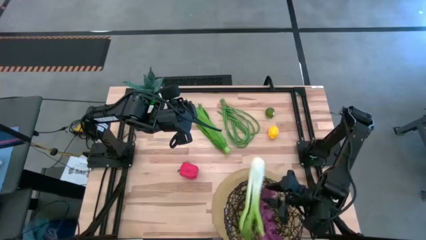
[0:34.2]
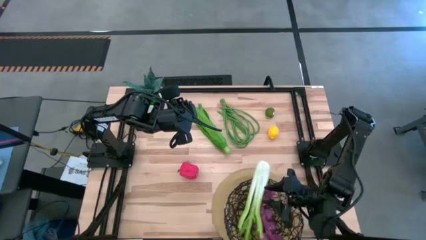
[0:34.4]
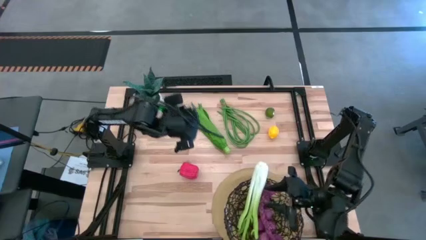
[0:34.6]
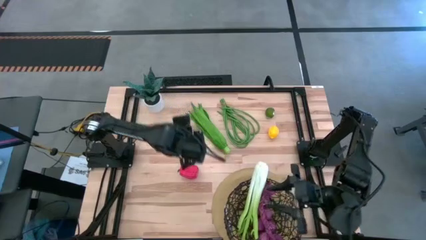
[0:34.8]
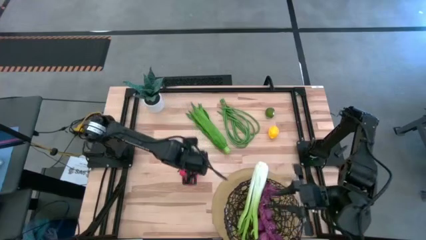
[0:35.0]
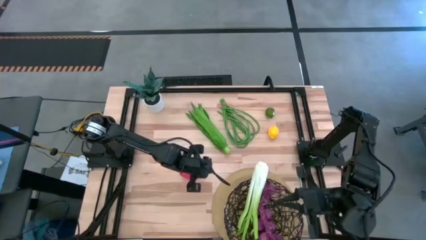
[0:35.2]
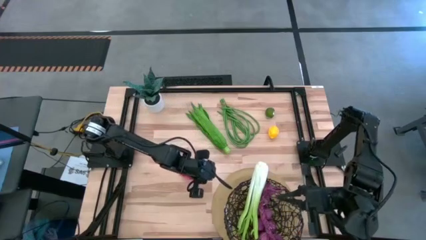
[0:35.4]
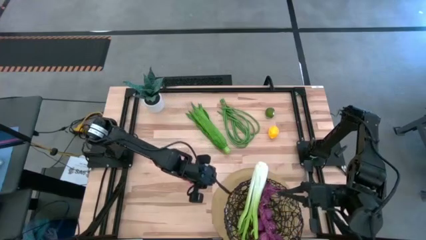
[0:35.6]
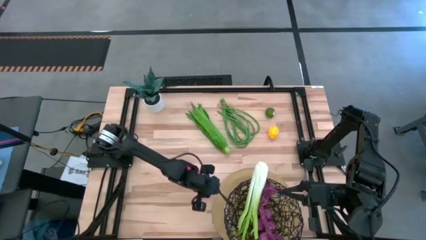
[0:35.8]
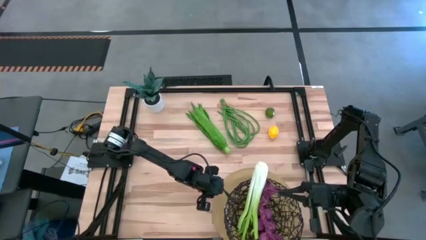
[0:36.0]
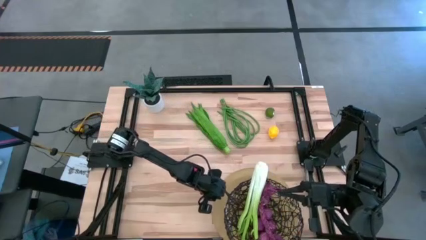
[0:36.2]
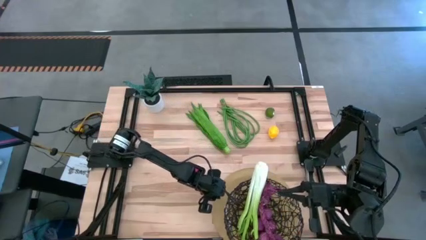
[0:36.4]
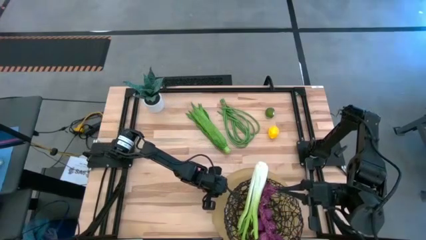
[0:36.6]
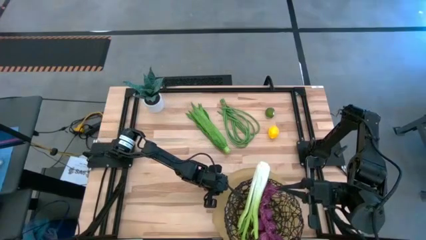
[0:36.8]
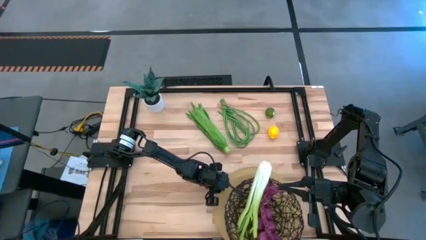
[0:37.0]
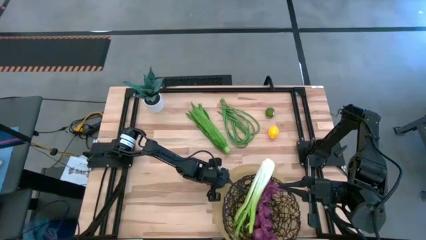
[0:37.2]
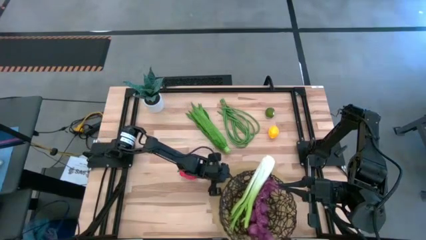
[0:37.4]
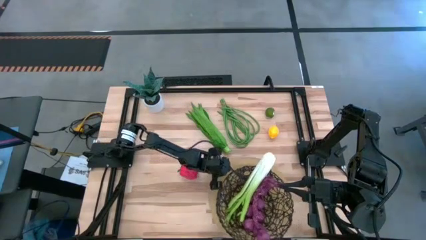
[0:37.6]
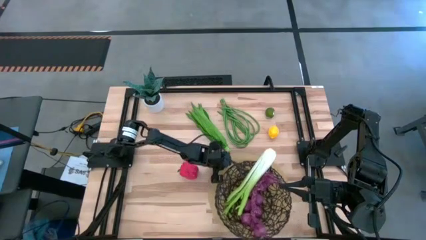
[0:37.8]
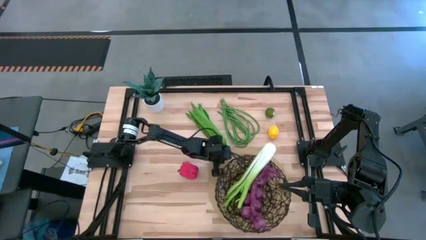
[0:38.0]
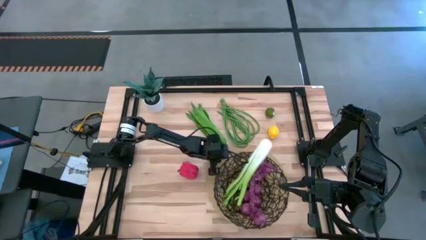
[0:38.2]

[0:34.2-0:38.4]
Task: Build produce basket
Move the brown mat to the center of the table

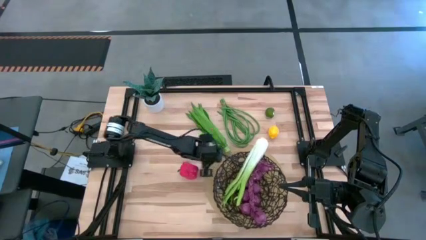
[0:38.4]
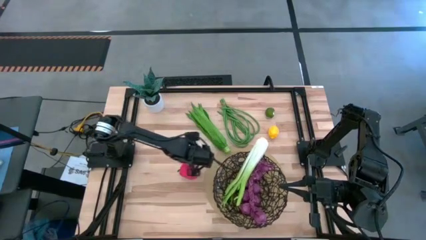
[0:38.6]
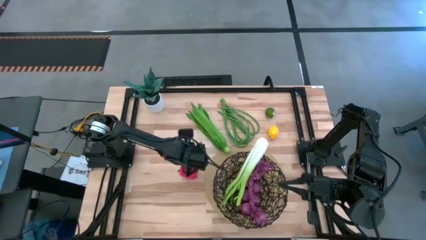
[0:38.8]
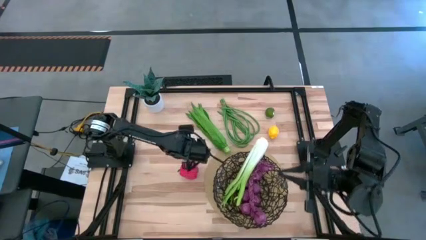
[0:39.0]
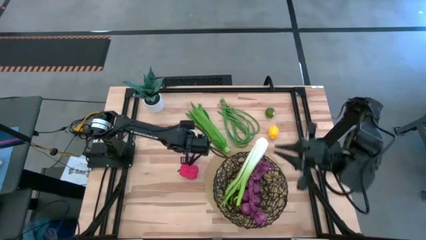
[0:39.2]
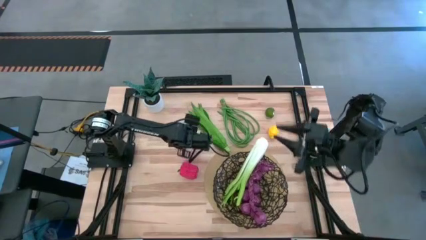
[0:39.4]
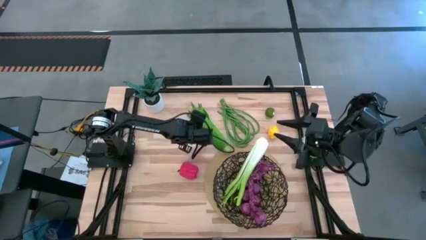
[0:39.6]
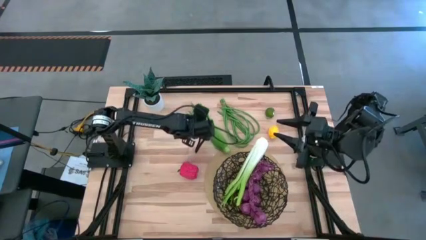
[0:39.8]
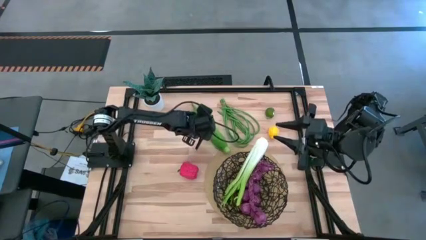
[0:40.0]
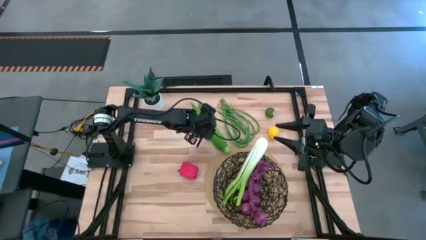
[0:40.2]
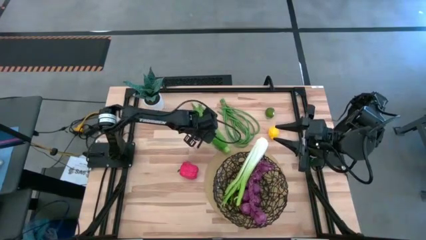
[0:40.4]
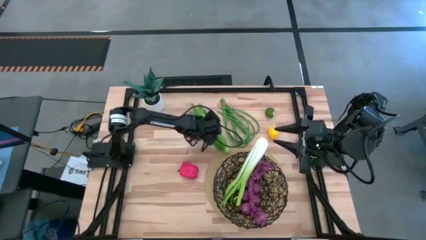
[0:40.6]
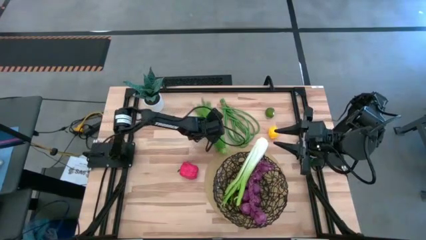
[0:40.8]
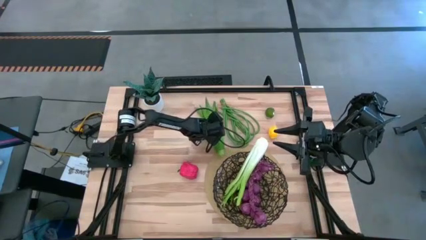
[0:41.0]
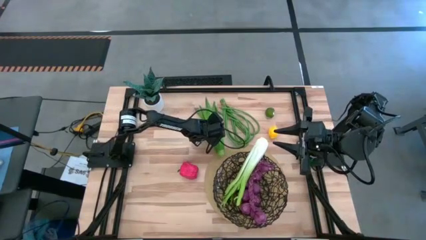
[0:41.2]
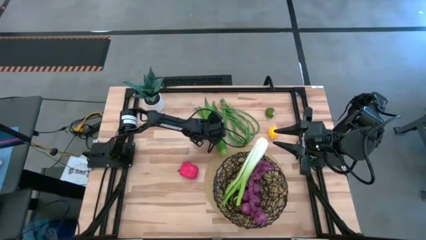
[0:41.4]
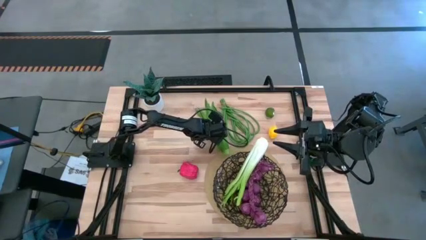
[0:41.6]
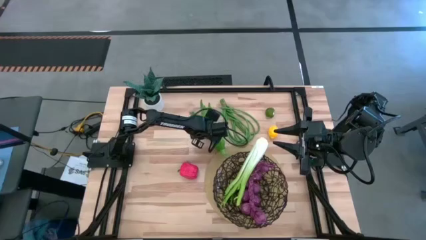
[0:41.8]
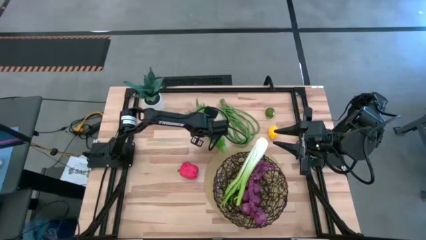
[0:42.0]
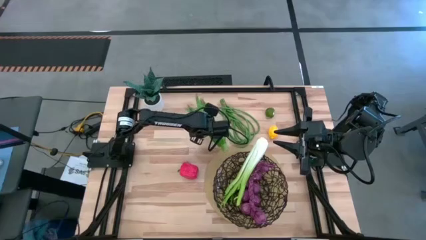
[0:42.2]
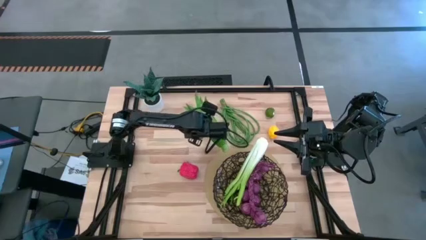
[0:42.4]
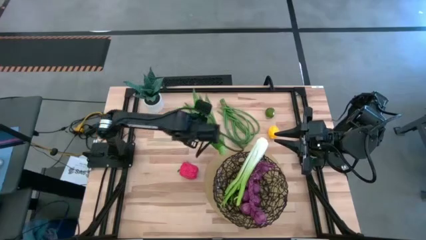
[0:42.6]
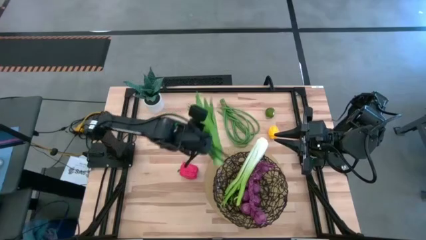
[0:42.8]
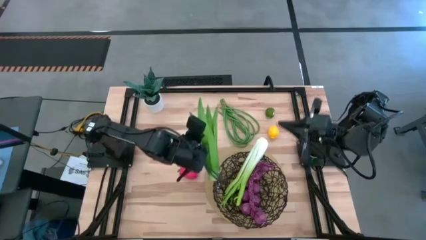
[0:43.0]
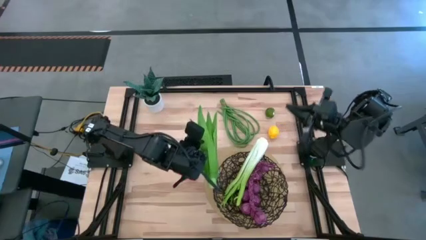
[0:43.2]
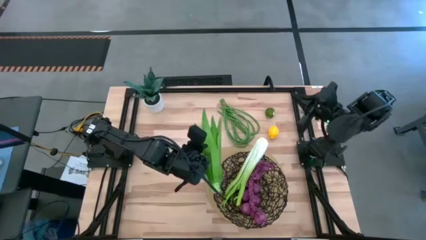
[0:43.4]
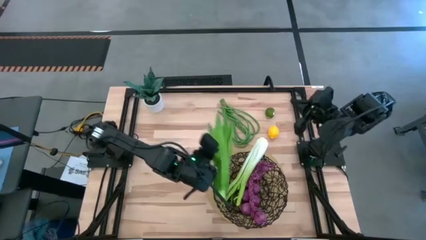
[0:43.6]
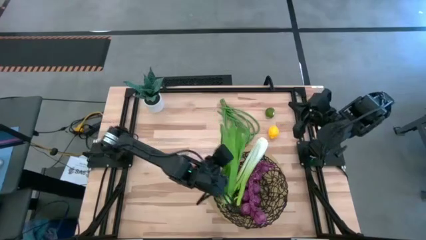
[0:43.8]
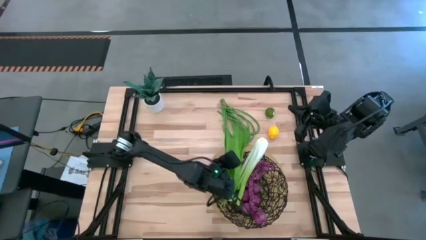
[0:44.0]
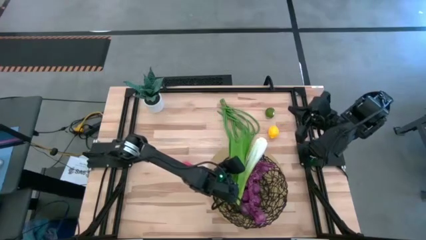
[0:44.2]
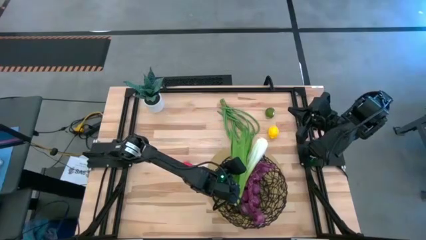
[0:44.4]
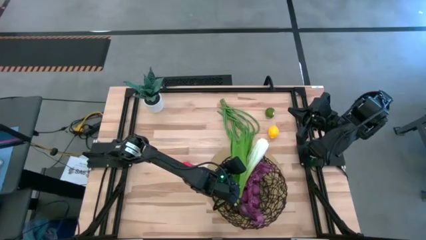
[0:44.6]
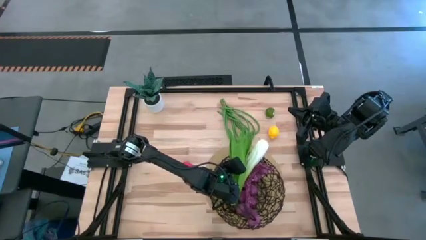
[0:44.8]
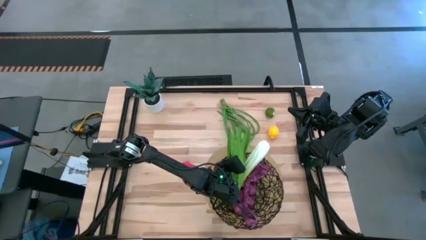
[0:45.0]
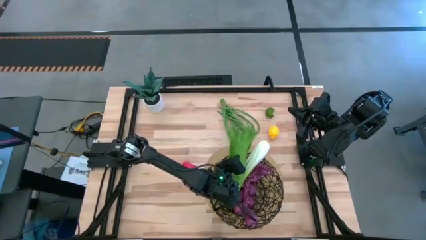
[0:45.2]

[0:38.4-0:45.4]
Put the green leaf lettuce into the black basket
